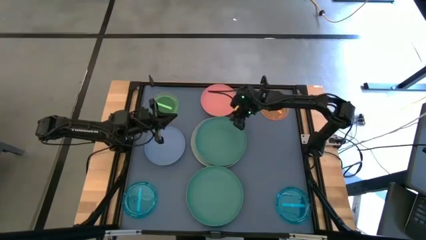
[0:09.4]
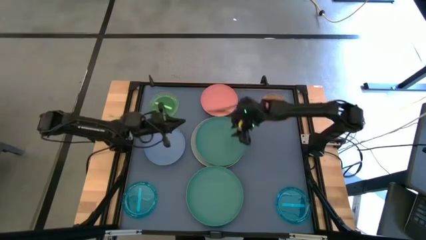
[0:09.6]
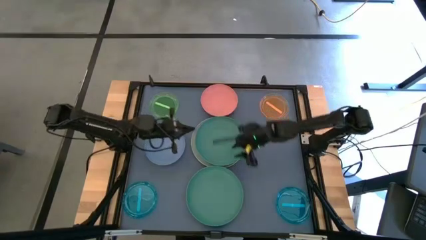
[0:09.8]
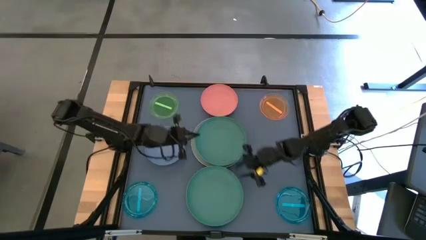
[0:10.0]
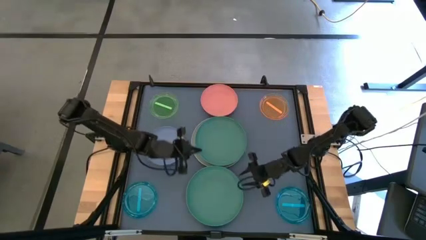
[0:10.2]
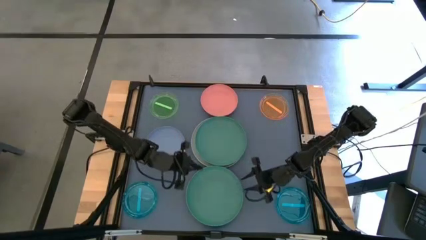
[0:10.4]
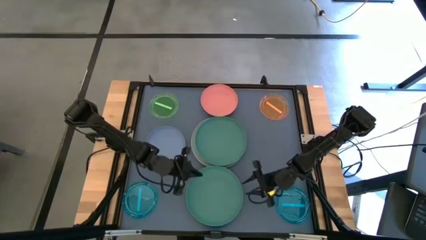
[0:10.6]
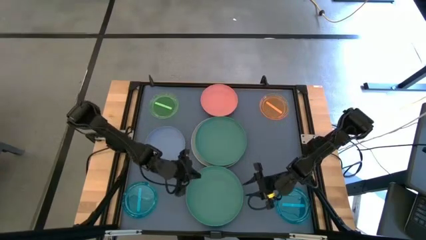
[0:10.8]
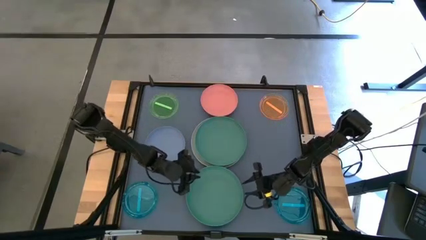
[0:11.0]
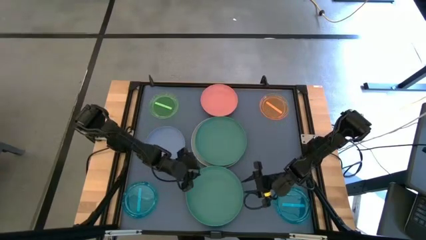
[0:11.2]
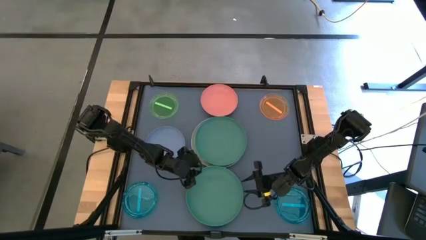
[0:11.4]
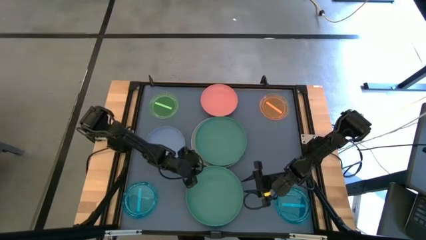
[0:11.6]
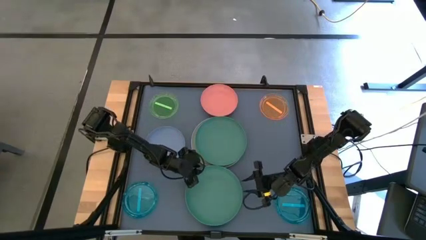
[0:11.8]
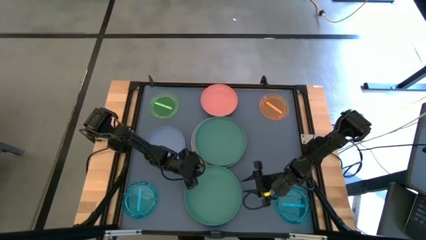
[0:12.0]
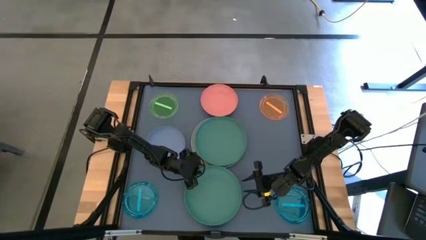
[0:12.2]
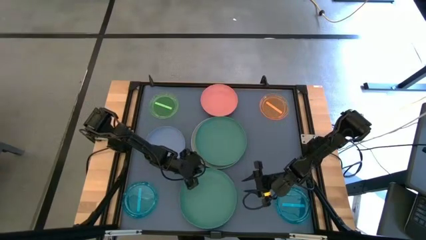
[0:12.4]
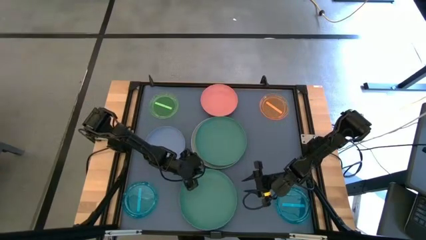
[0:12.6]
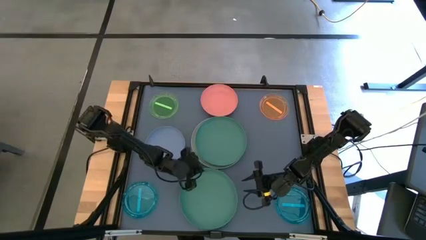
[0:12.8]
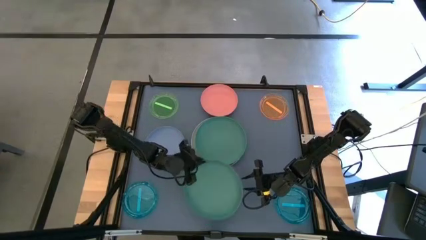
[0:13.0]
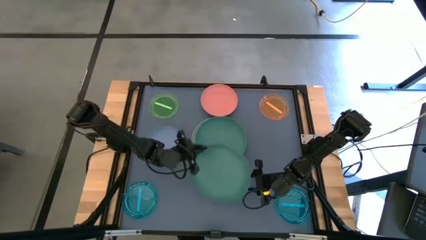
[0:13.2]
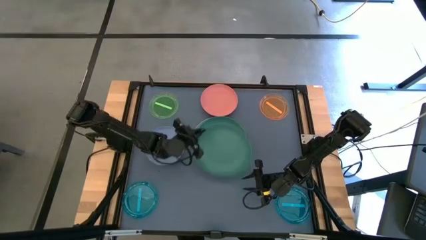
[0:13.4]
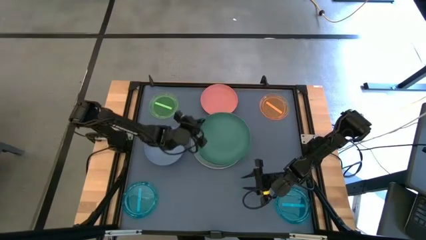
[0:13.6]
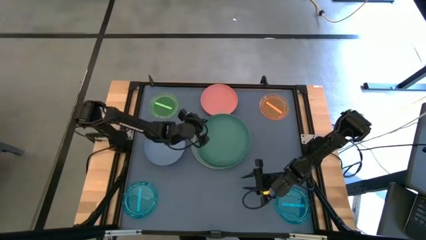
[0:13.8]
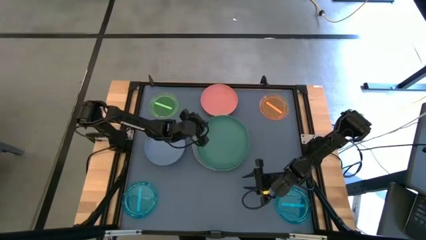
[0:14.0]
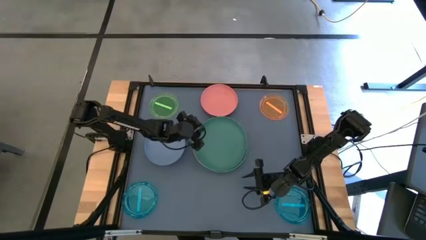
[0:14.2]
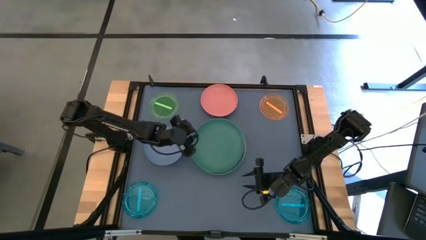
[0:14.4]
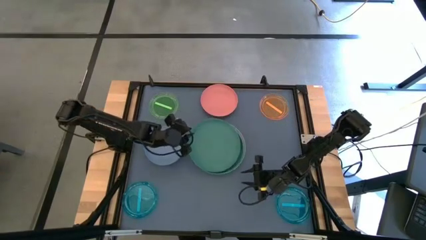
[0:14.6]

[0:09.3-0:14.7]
Task: Stack plastic plates
Stack the dark green plate on the dark green plate

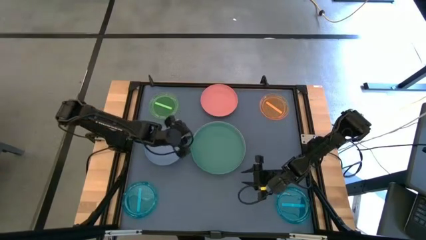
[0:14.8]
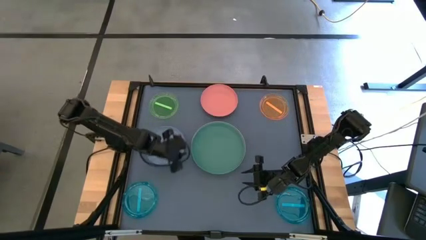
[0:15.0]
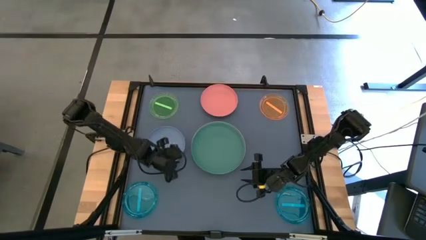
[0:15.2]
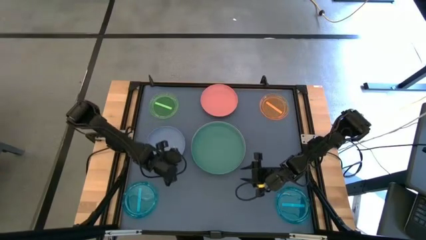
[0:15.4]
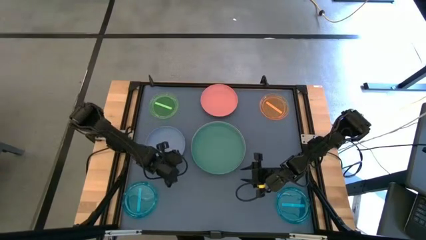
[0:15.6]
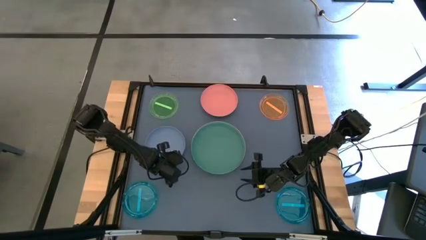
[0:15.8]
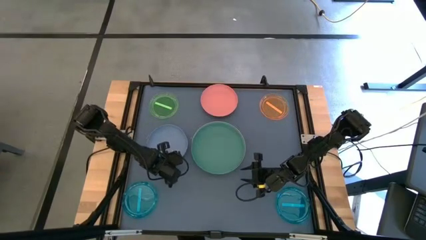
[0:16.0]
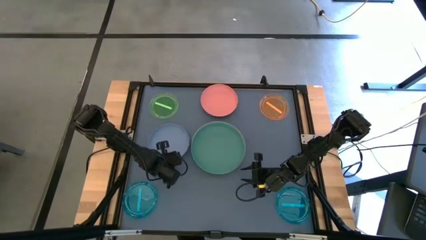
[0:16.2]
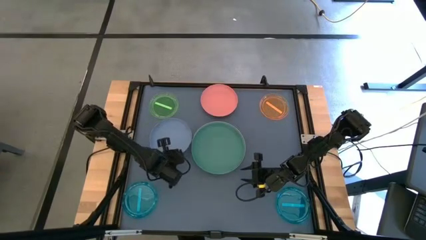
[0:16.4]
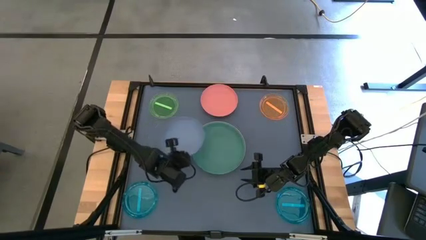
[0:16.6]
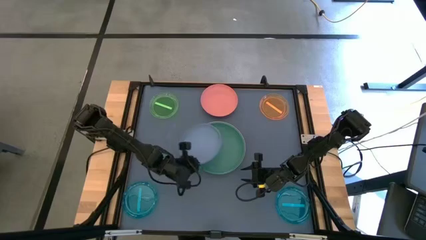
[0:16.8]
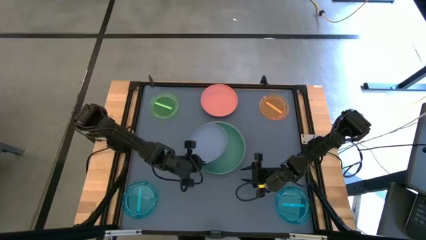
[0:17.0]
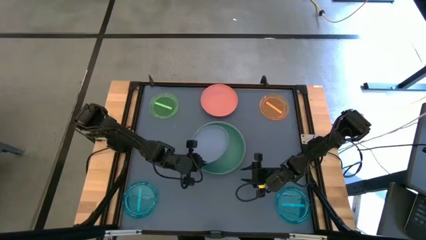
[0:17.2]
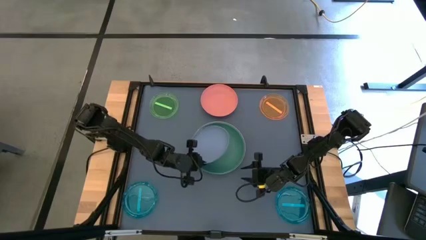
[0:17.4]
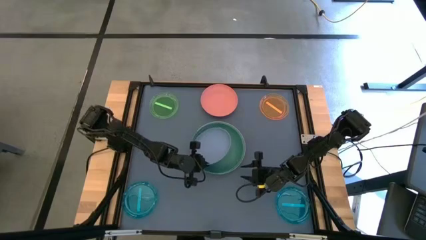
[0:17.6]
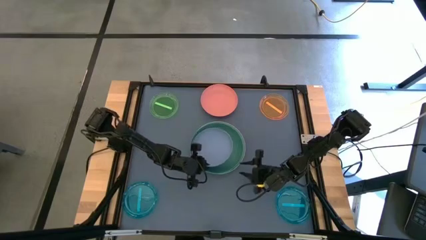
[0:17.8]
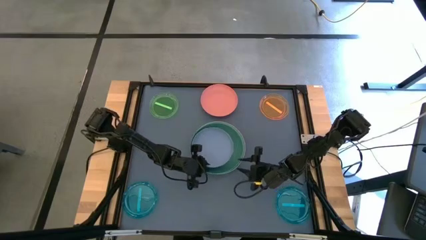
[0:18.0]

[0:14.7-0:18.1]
Stack the violet plate on the dark green plate

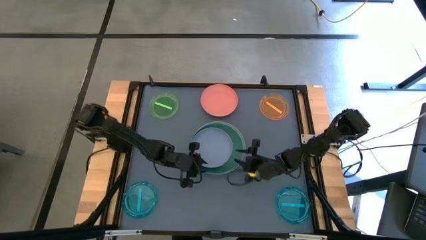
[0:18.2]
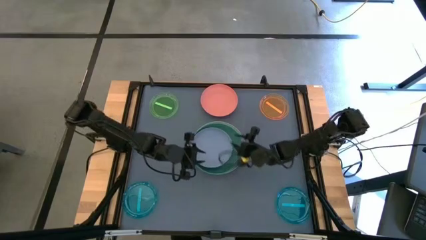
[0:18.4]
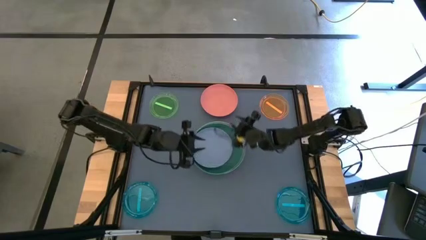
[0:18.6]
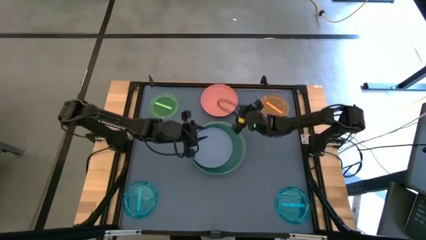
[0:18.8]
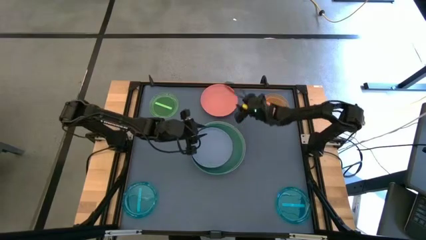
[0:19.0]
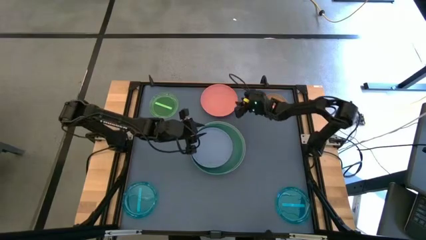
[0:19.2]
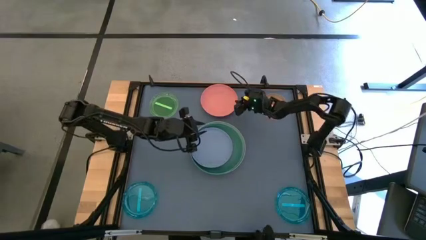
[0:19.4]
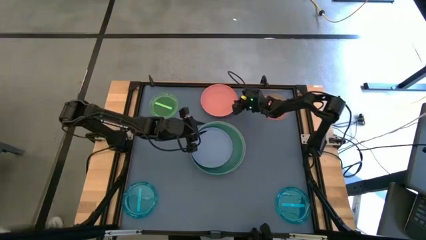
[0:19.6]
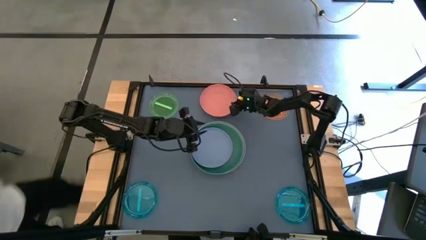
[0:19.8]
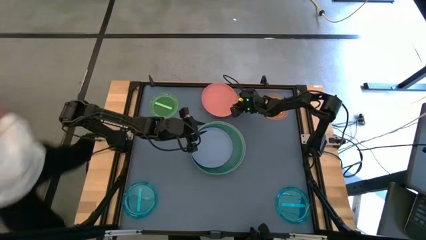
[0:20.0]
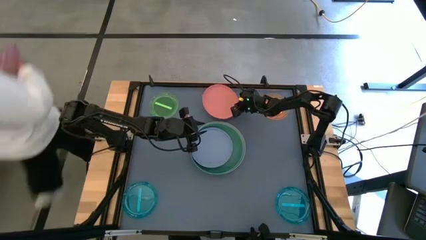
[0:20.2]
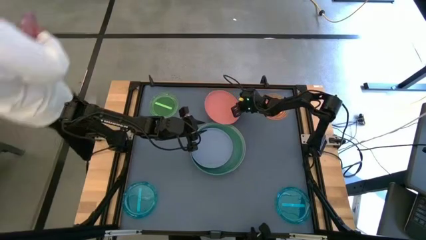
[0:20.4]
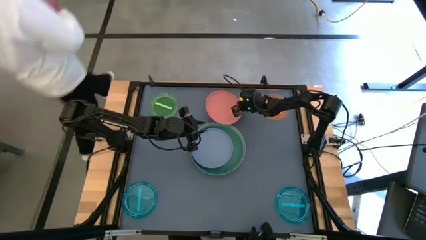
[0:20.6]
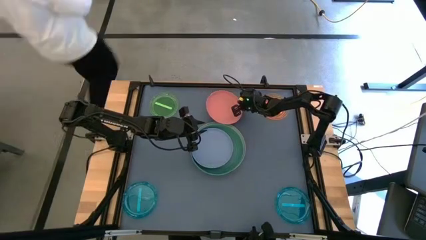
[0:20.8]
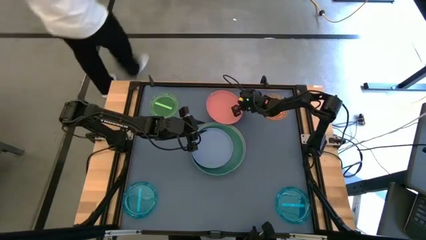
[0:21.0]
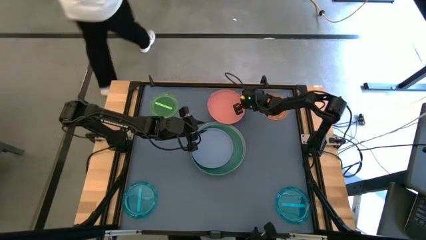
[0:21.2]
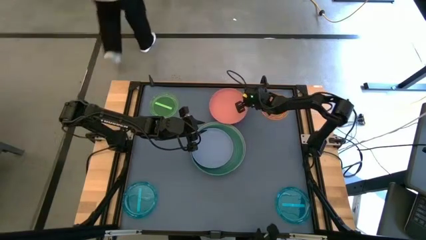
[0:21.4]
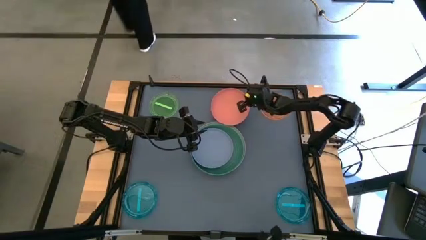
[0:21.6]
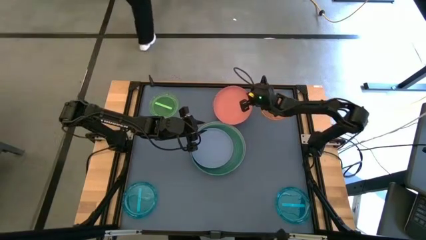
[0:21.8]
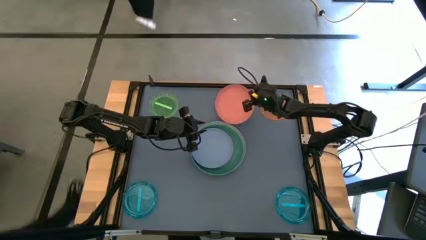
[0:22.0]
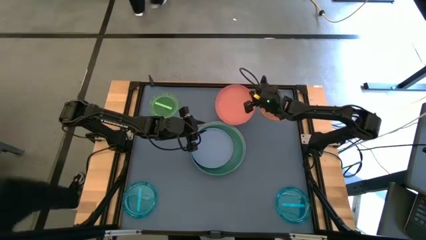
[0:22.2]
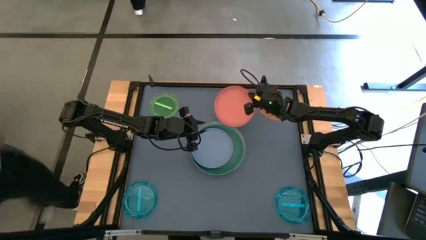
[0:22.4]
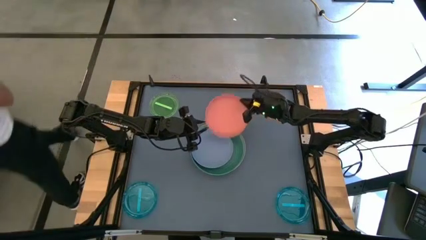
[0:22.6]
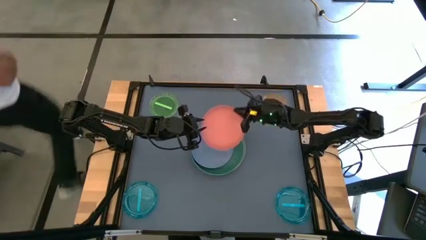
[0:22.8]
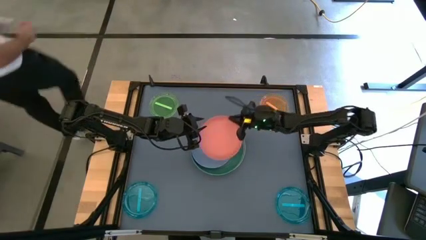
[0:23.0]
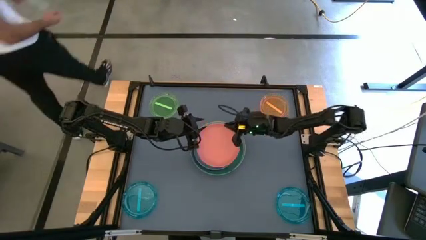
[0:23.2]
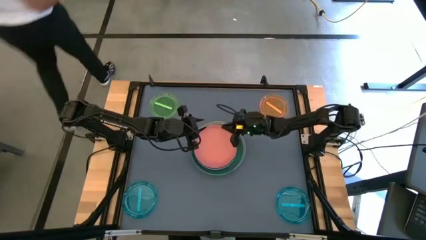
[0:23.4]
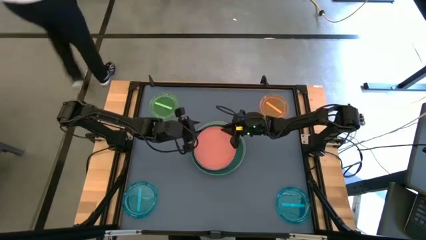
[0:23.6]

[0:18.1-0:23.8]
Stack the pink plate on the violet plate

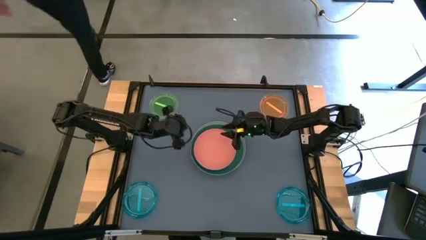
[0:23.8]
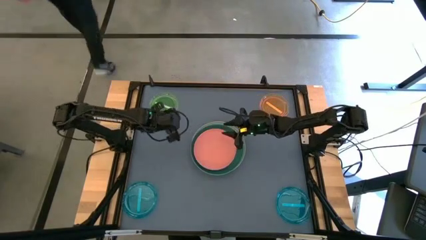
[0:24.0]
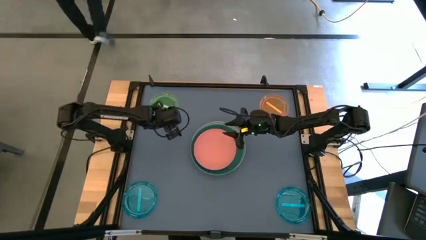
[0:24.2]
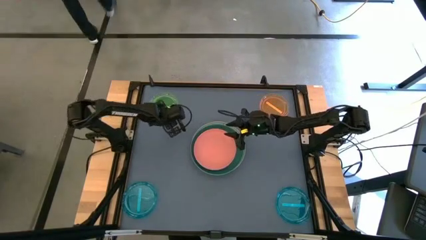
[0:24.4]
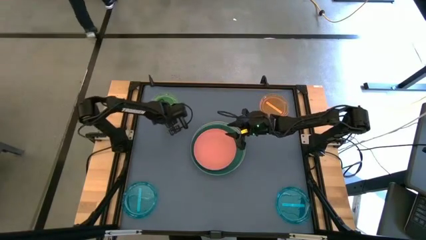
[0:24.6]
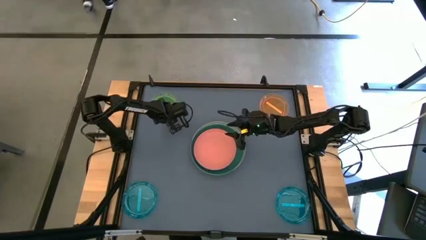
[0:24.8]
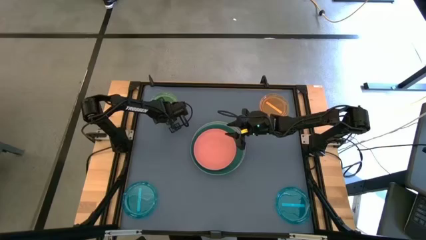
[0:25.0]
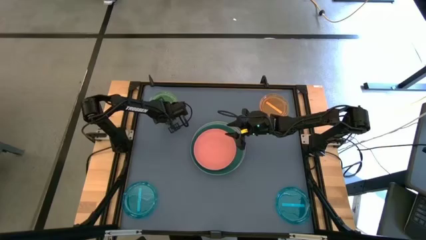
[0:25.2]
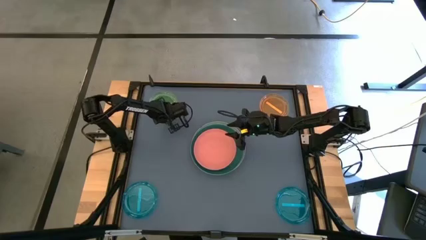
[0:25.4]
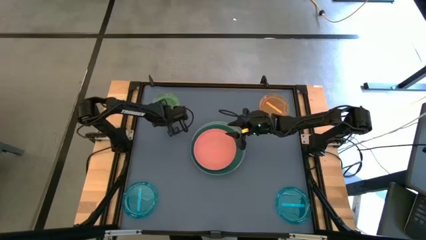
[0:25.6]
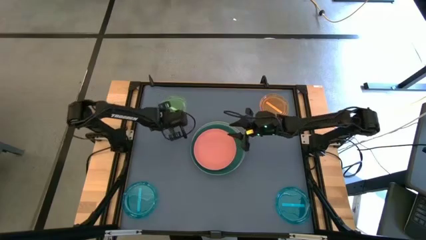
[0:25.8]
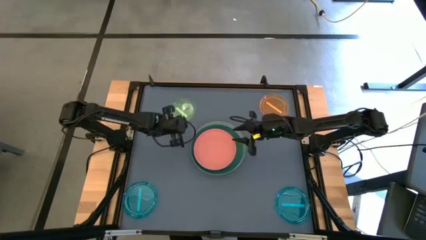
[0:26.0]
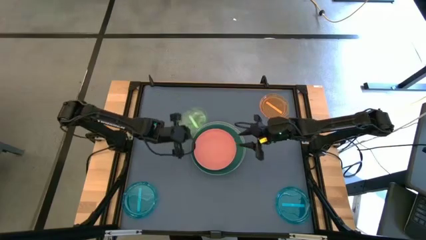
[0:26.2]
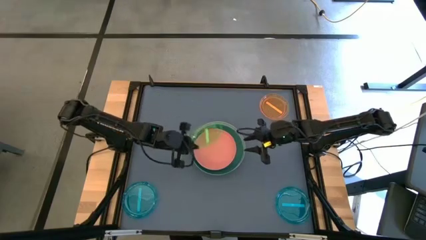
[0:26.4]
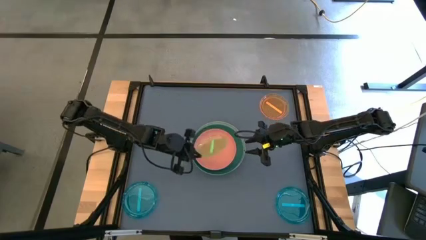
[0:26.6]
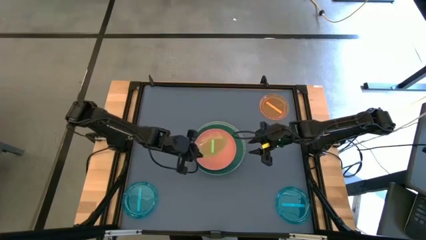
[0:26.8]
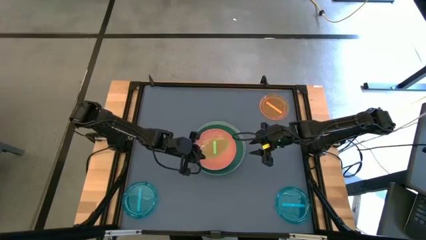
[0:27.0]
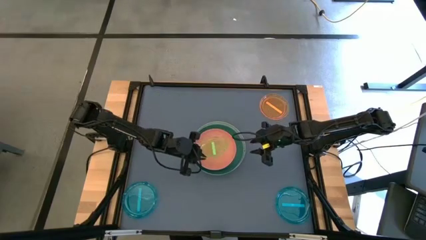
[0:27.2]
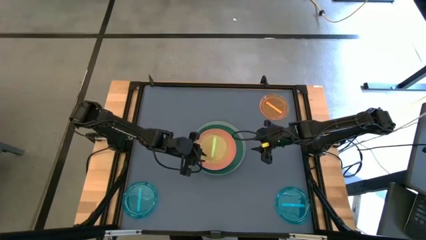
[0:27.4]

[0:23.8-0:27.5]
Stack the green transparent plate on the pink plate
